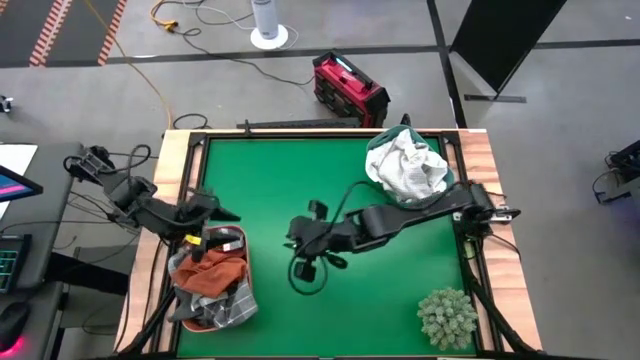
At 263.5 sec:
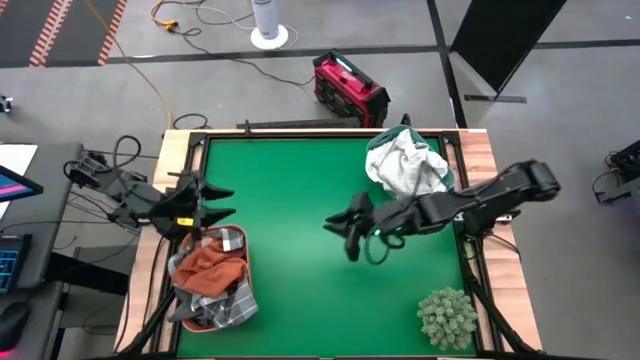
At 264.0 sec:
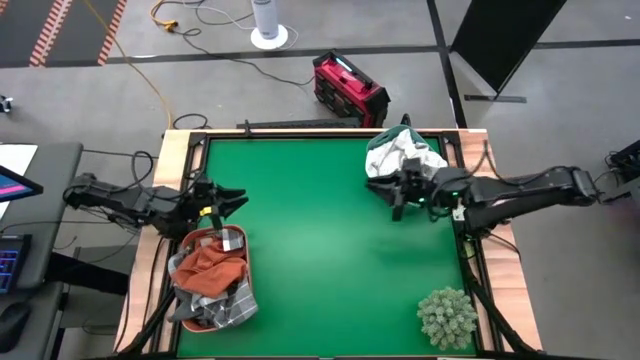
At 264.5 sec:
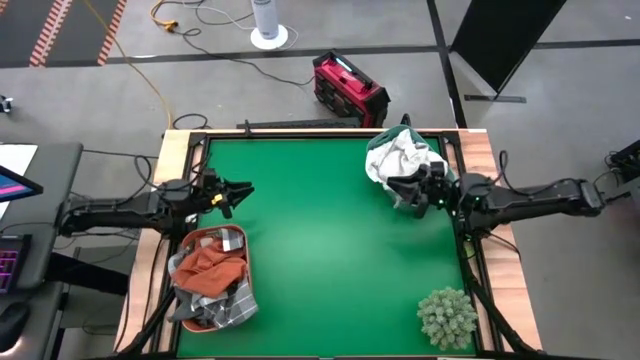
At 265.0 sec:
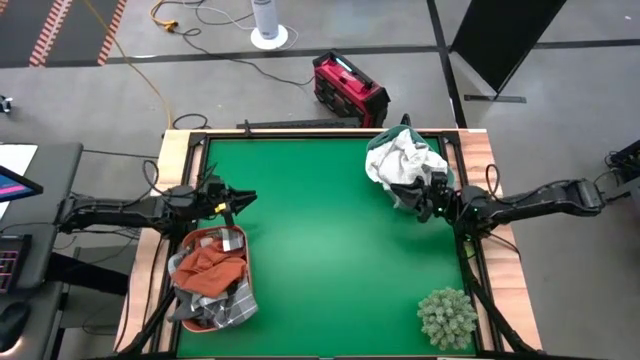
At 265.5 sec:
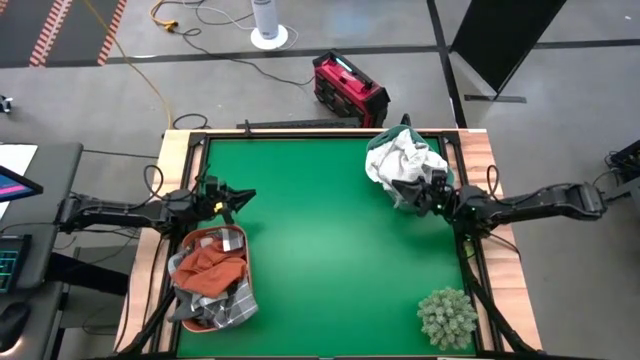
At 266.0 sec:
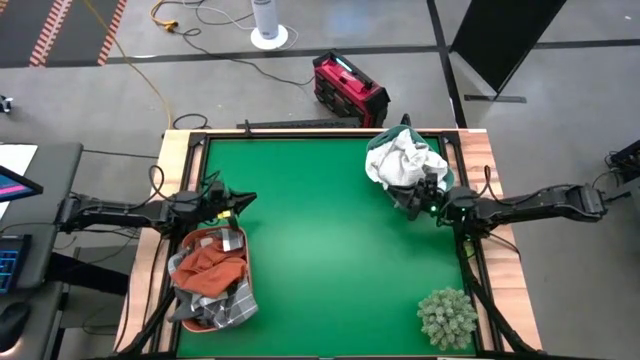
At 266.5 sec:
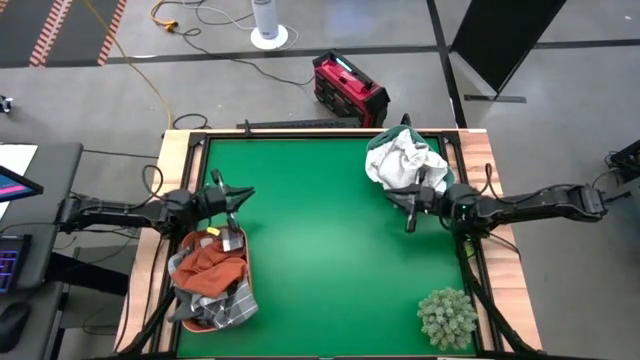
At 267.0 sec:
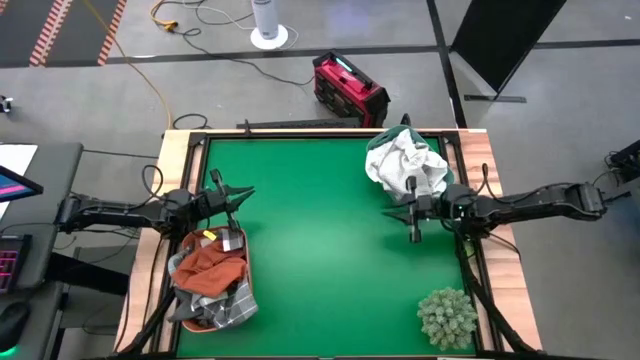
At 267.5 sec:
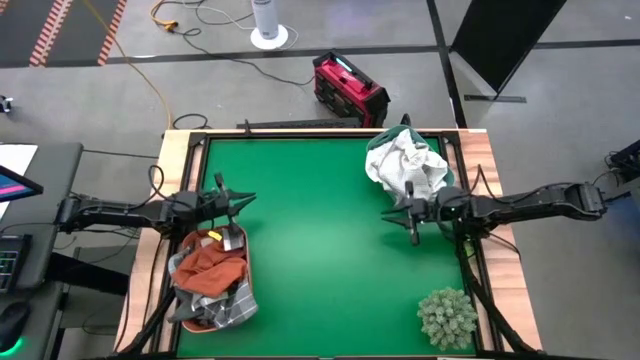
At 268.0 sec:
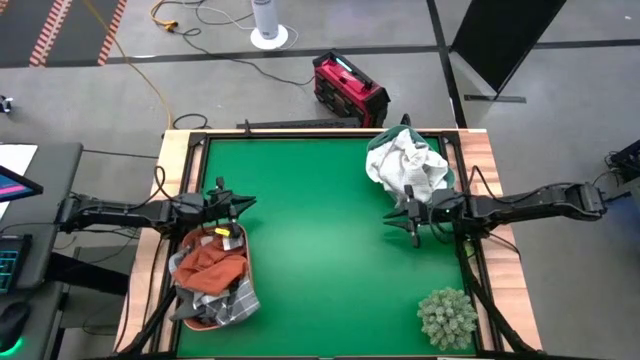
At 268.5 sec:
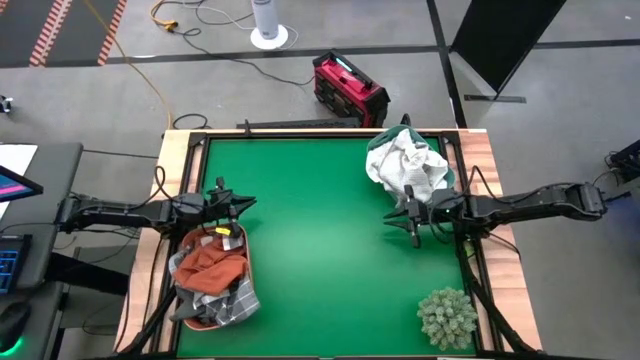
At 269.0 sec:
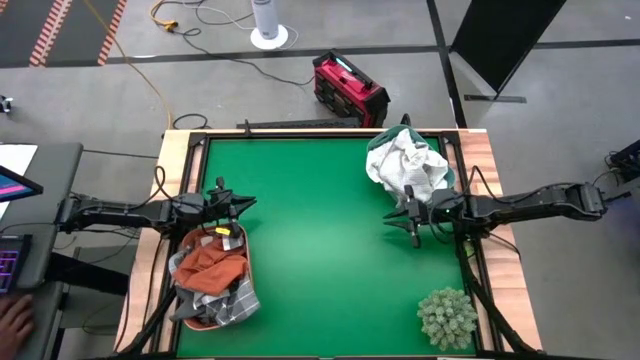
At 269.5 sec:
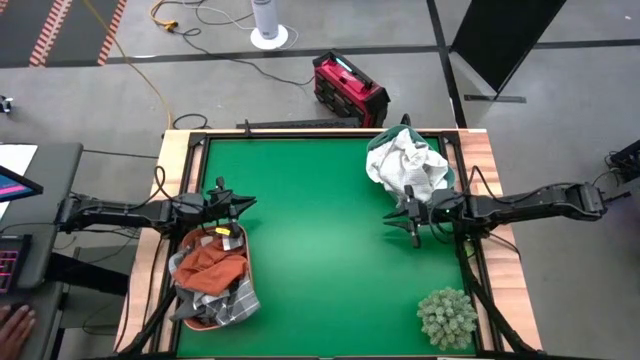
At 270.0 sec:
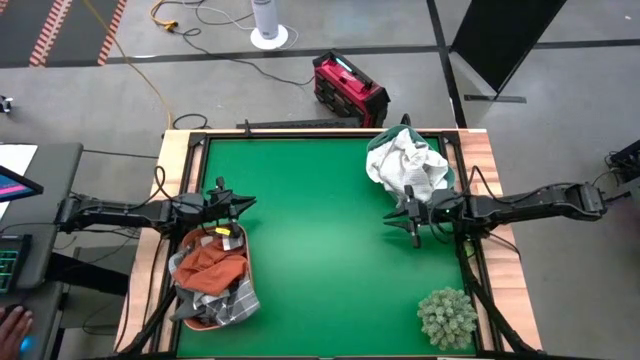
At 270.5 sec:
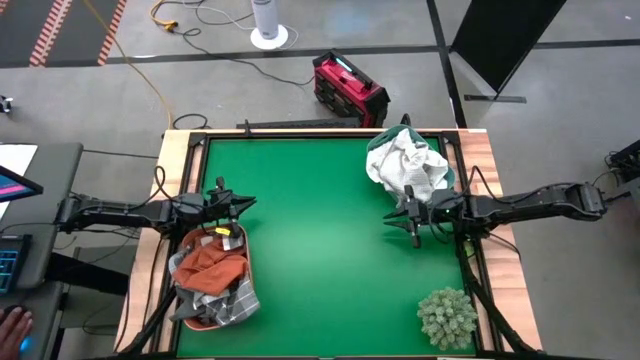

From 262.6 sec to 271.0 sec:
Task: Sort towels by color in basket
Return to Home Position

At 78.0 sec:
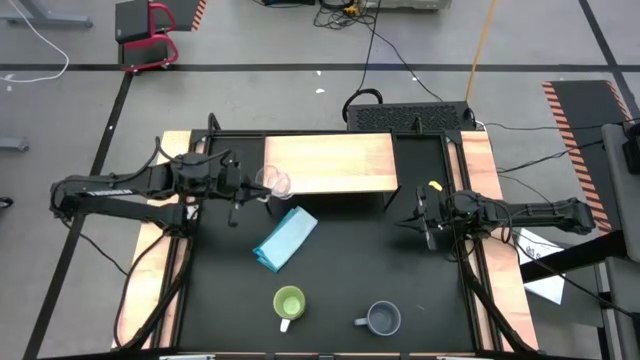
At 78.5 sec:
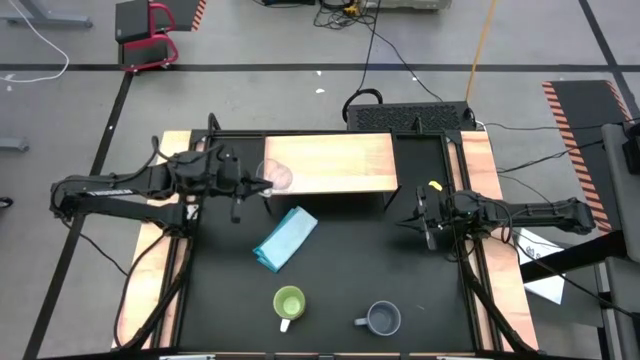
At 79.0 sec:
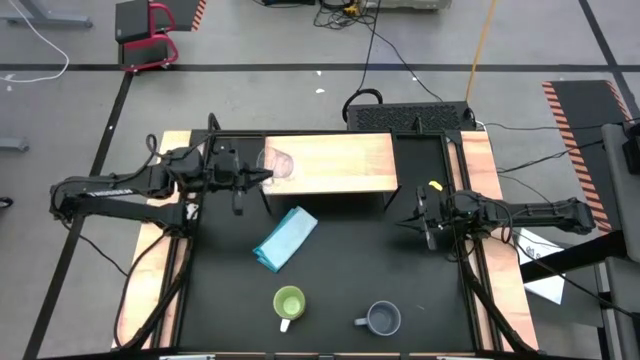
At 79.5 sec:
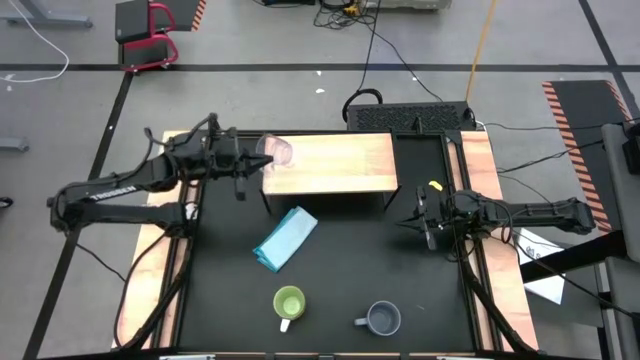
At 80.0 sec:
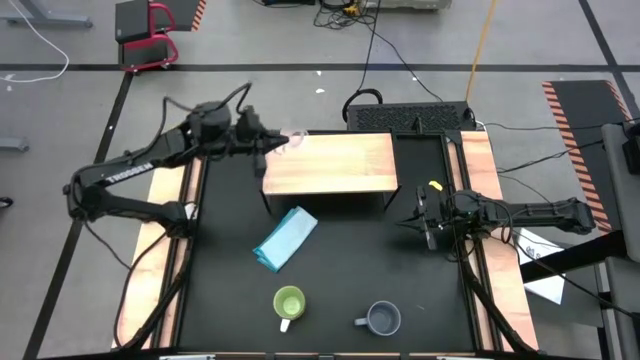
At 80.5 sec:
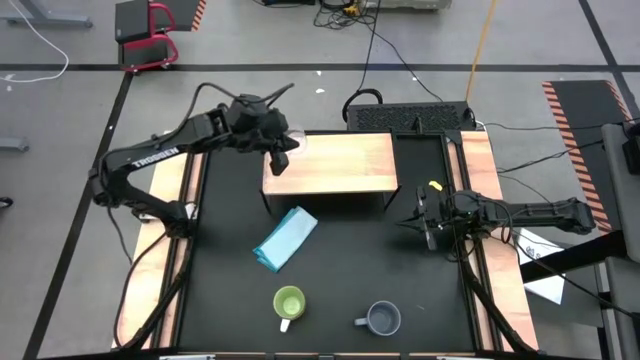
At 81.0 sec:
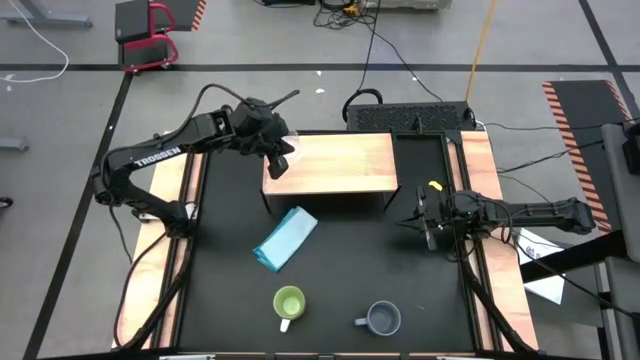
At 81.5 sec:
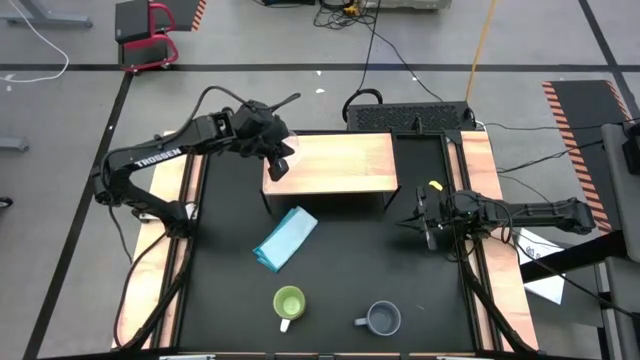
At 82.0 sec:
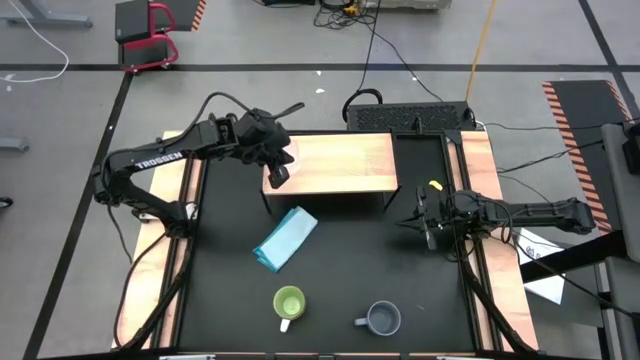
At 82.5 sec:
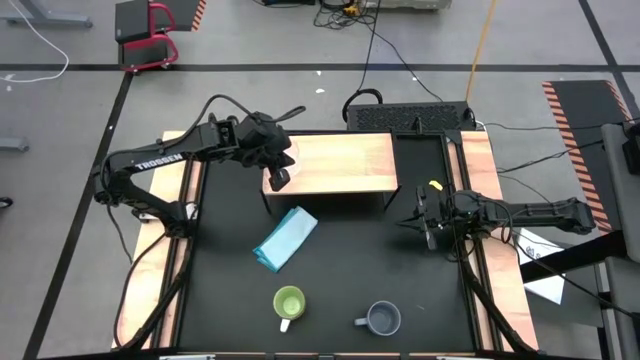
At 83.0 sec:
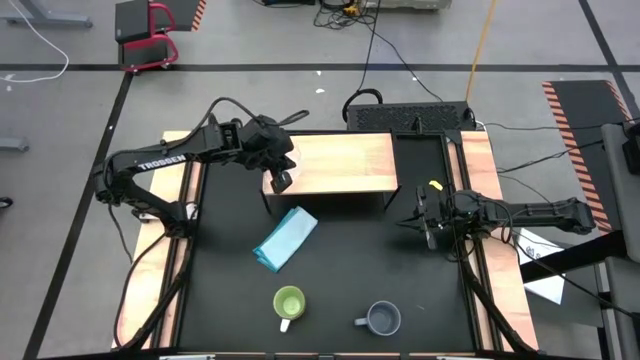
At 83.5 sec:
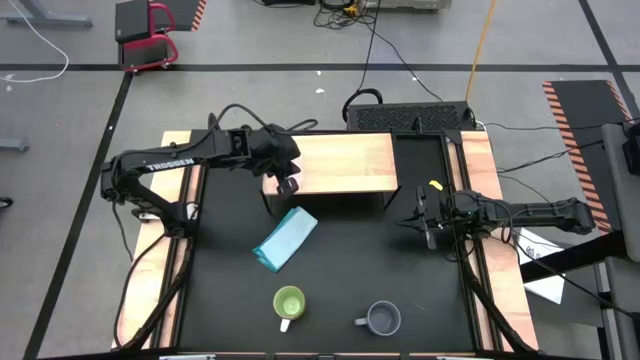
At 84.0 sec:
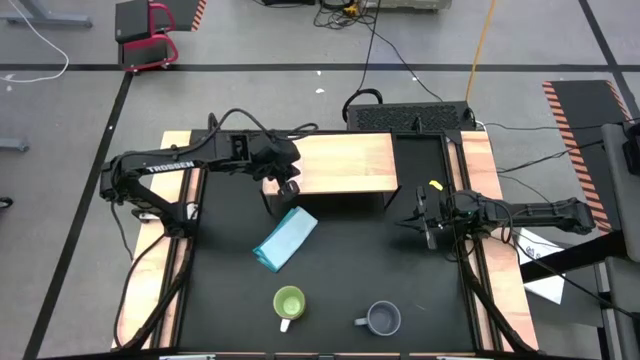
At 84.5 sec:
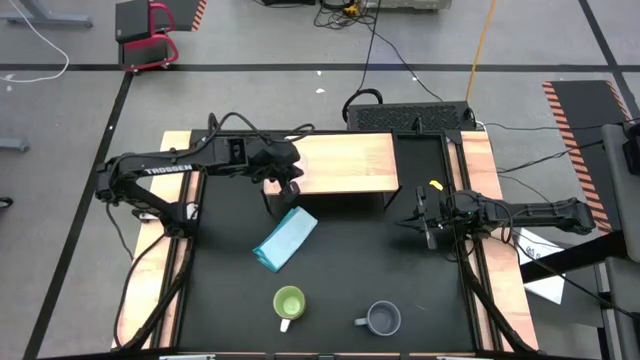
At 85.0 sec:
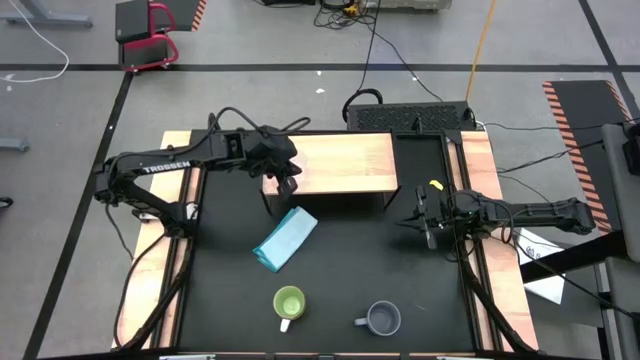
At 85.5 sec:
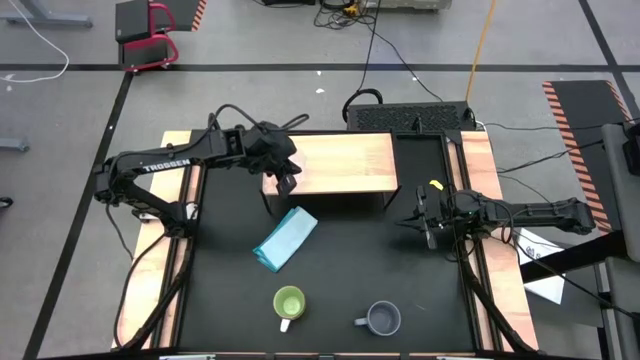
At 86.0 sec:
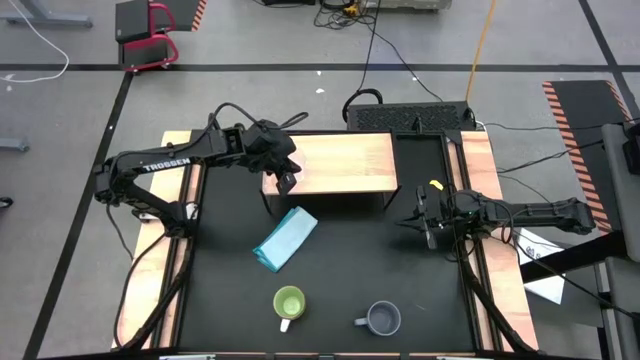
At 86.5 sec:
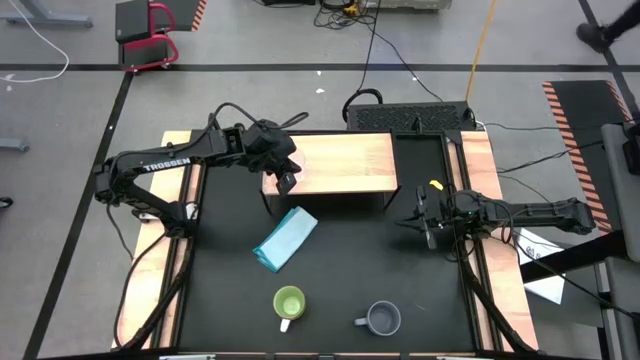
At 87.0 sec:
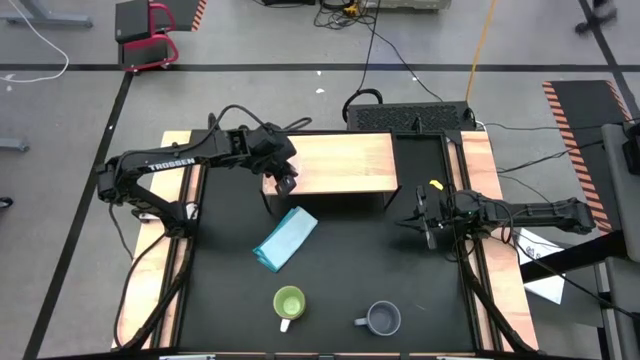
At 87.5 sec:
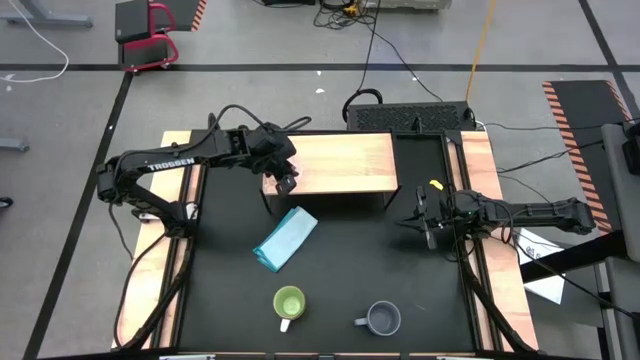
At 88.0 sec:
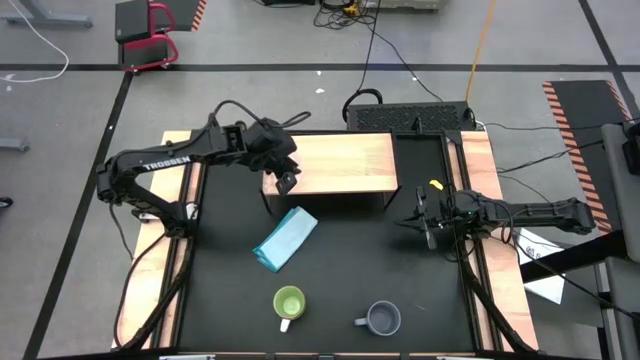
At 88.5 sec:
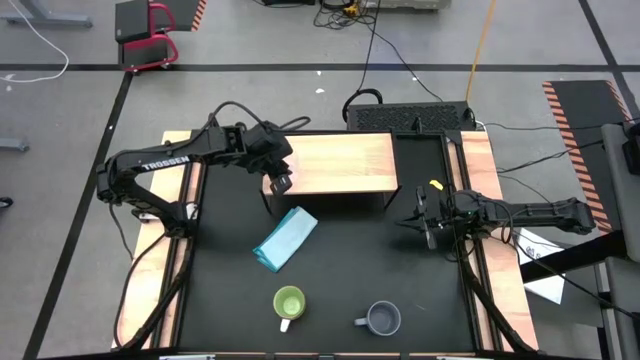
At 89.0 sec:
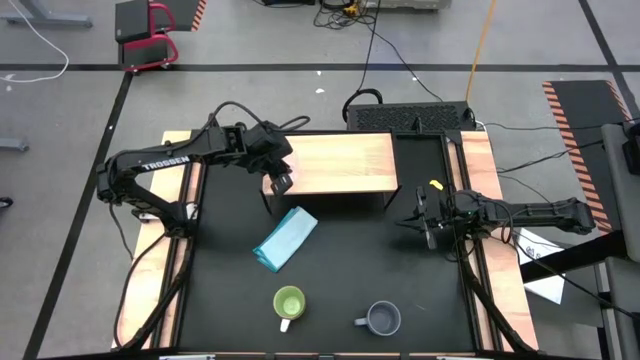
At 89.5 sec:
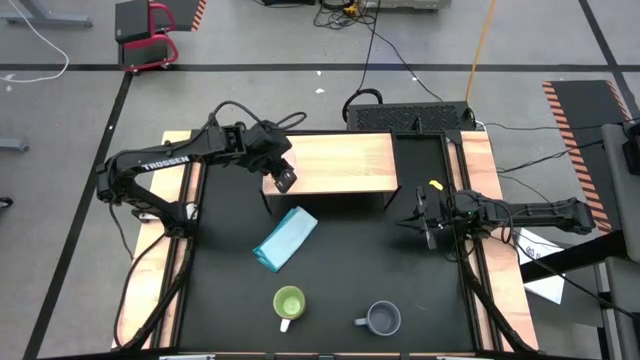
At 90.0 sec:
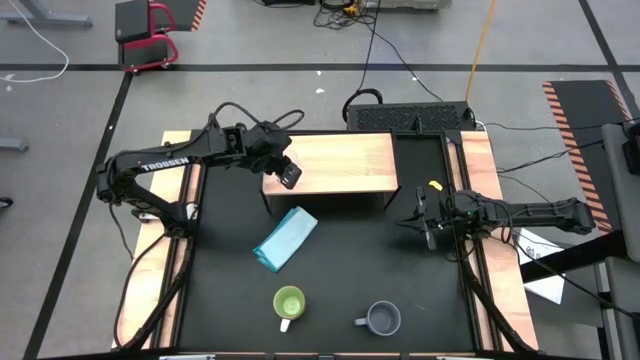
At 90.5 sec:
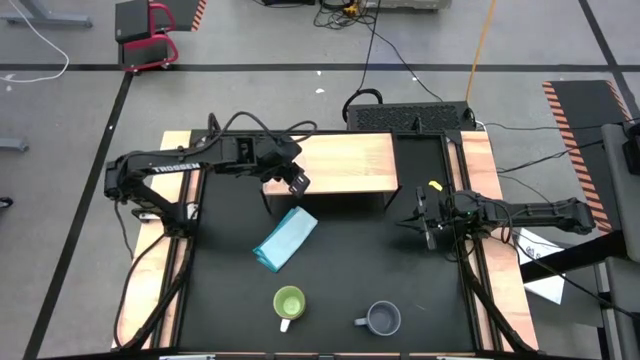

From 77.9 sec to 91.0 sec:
Task: Stack small to large cups/mugs on shelf
Put the transparent mug on the shelf
